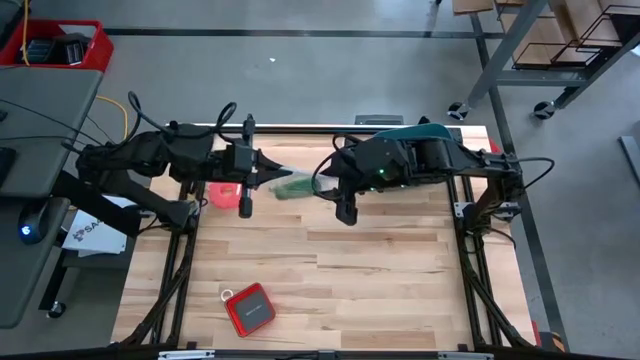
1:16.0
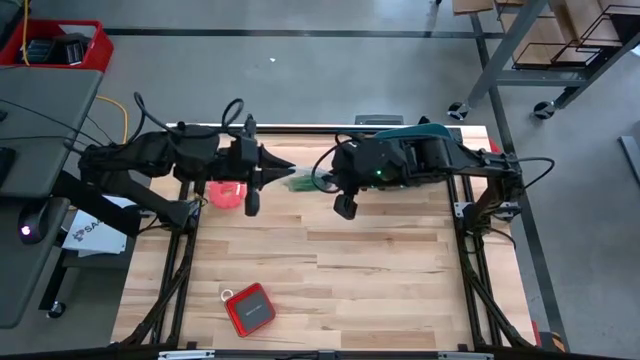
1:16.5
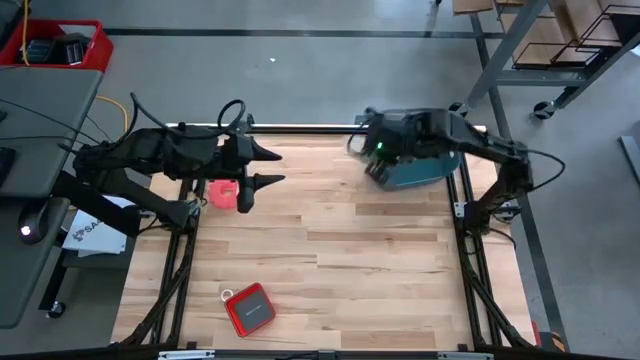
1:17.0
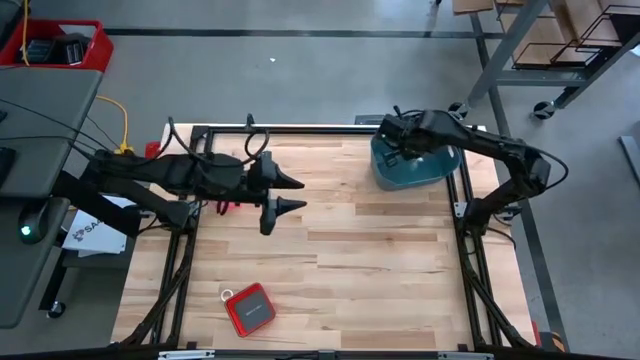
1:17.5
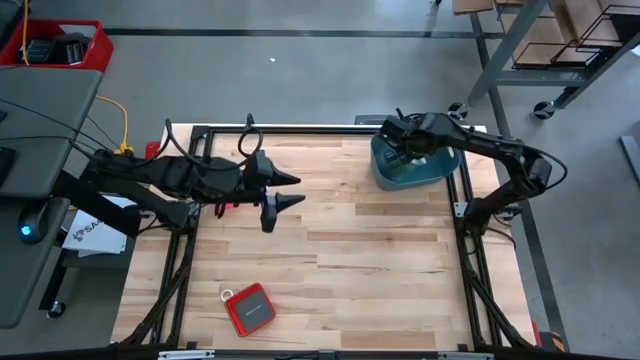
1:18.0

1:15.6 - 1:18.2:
Task: Roll bandage
Put the transparent zip bag into the blue bin

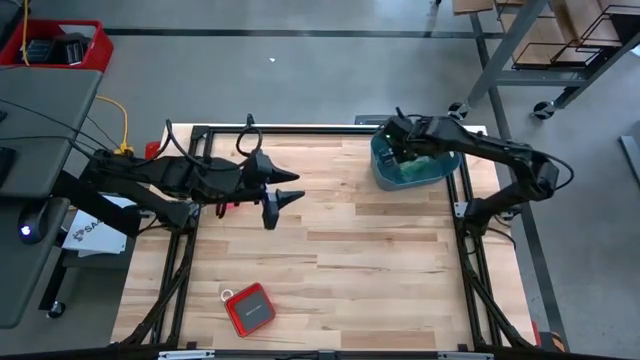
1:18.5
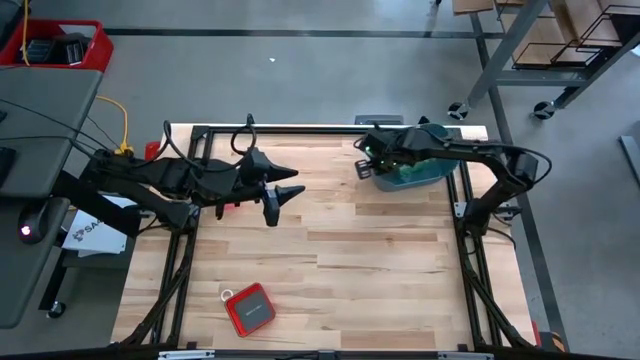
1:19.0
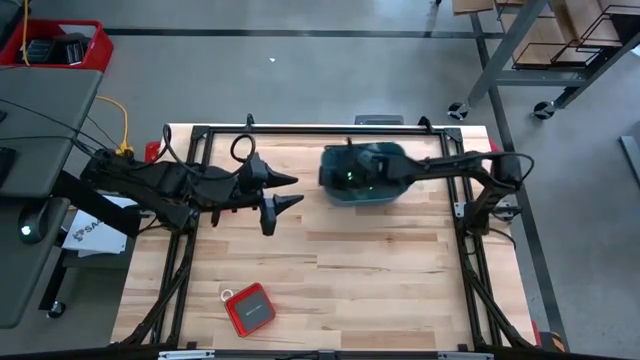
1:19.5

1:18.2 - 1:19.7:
Move the blue bin to the center of the table

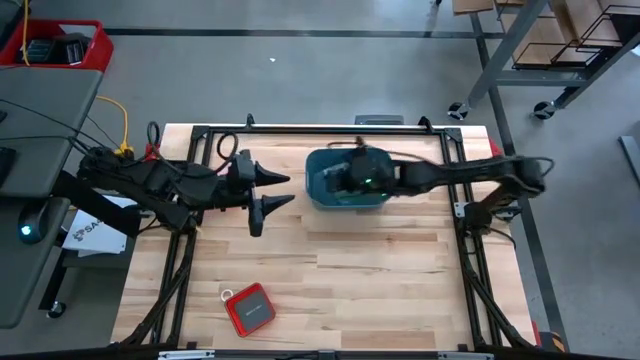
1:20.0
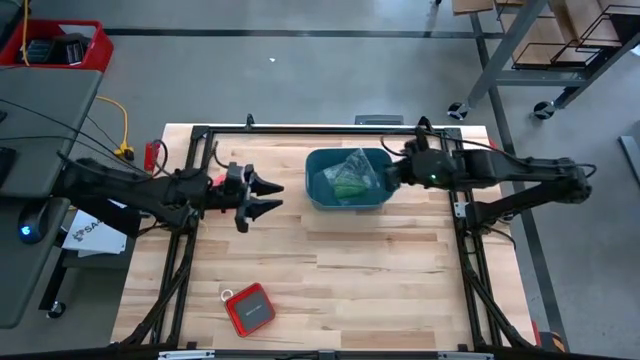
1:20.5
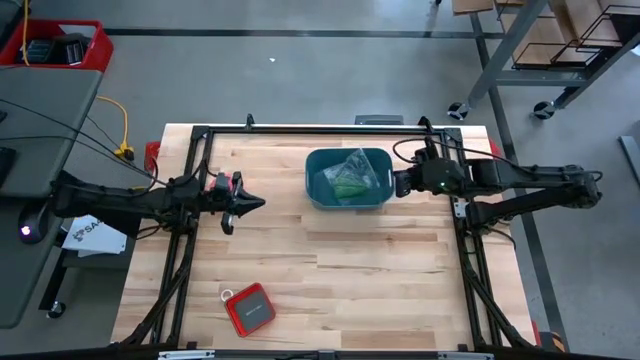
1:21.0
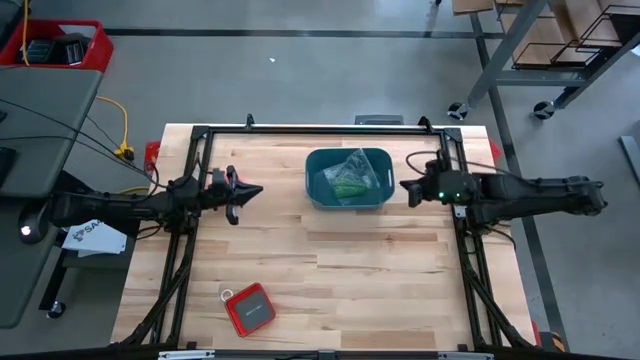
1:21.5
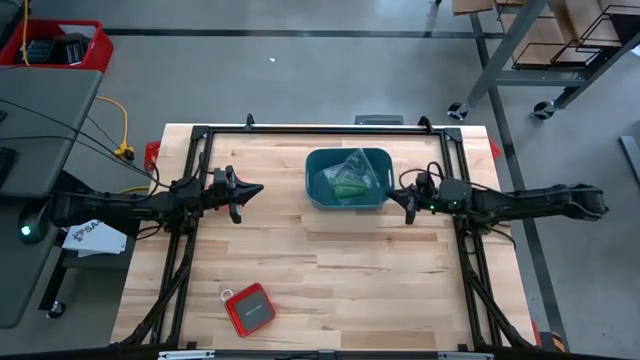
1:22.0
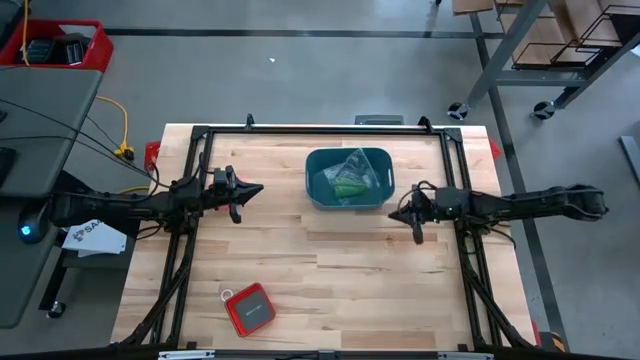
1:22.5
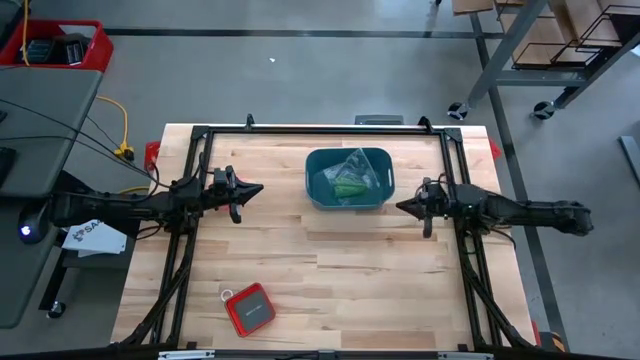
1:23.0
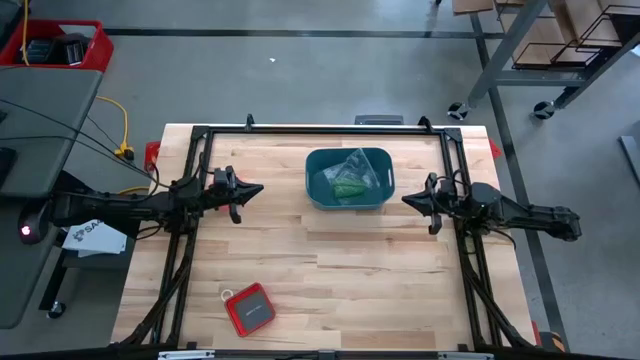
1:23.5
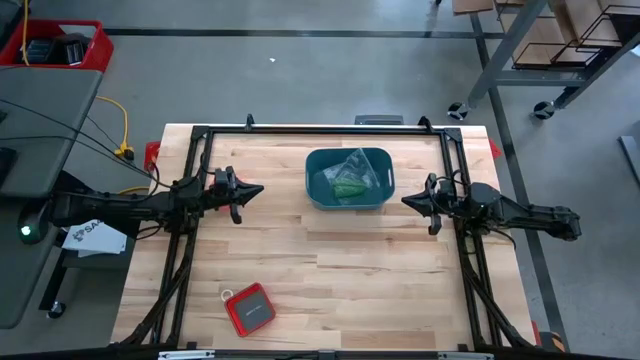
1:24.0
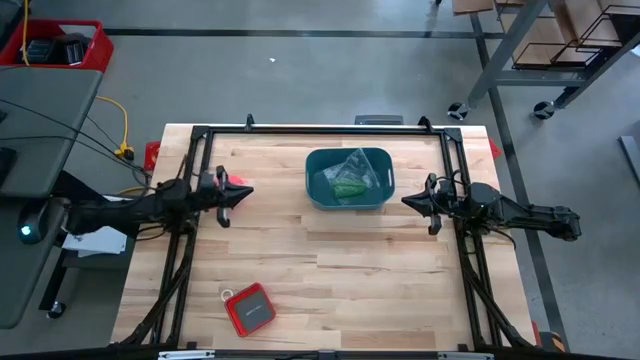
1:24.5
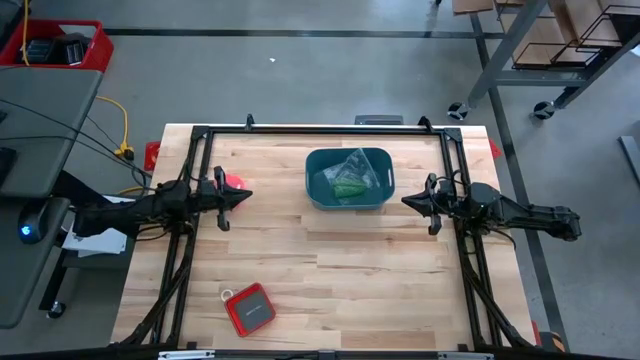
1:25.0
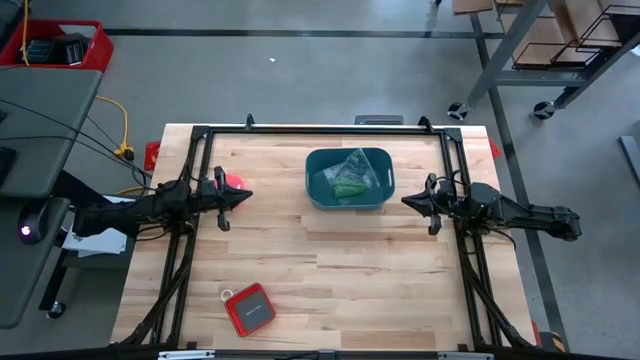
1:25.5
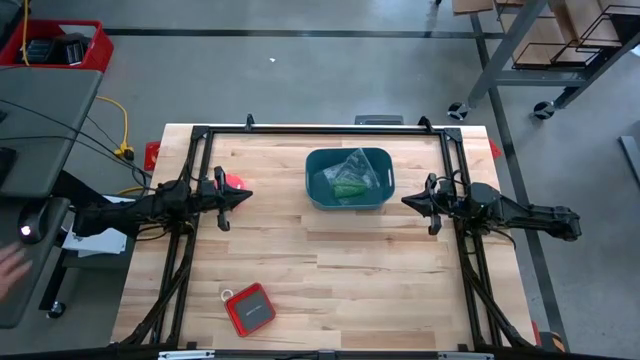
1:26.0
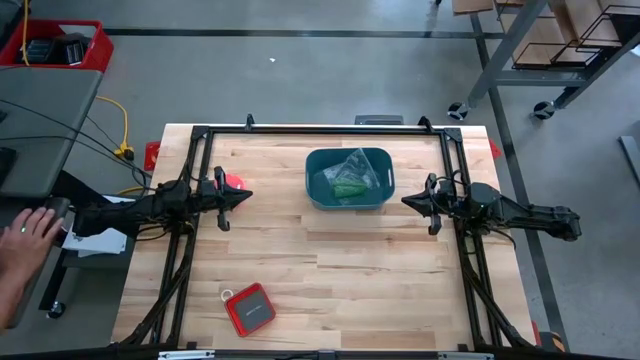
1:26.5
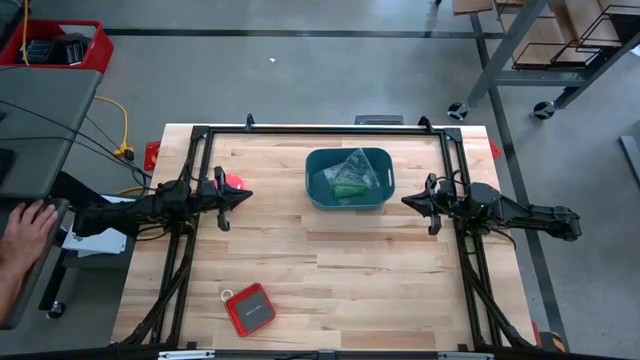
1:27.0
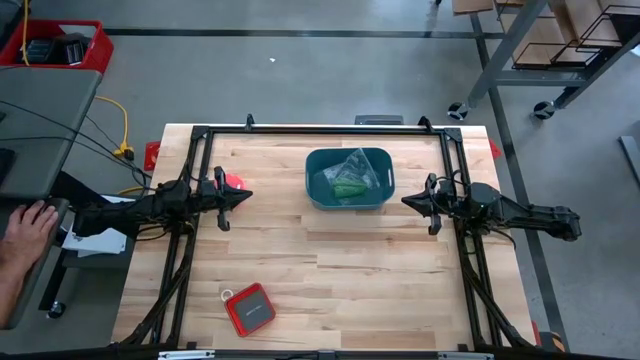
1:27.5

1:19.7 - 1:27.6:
Return to Home Position

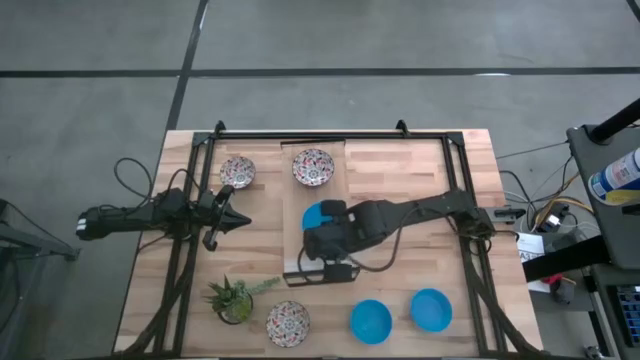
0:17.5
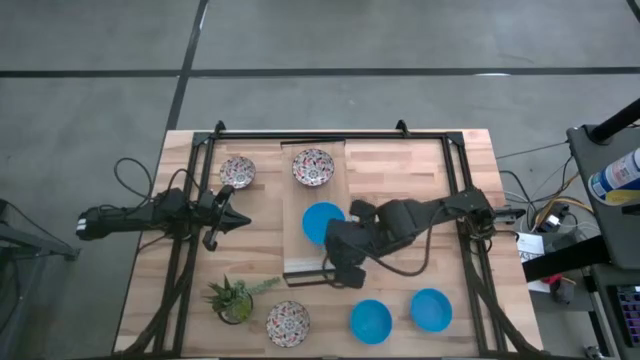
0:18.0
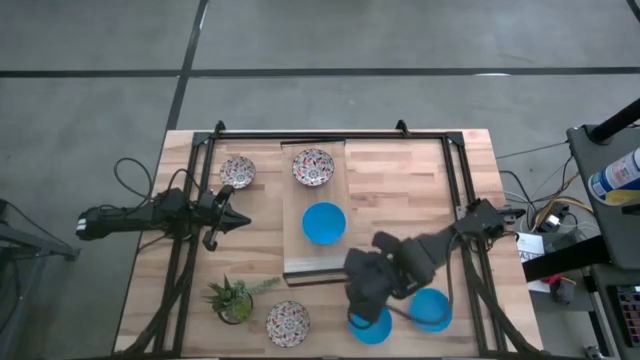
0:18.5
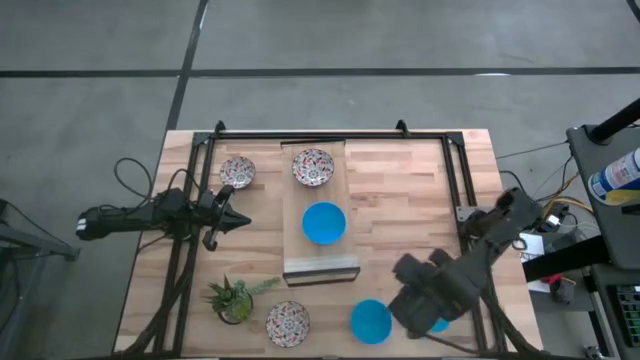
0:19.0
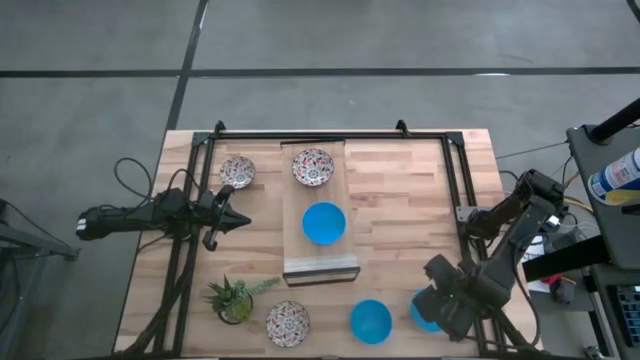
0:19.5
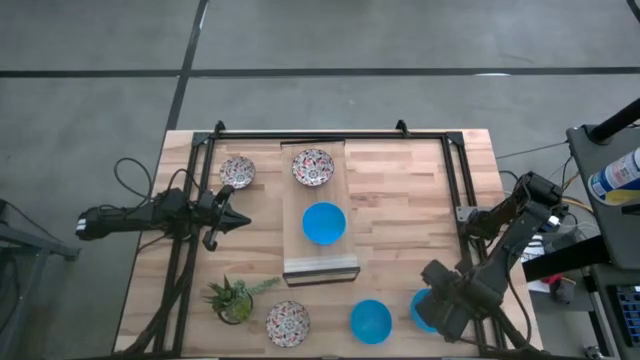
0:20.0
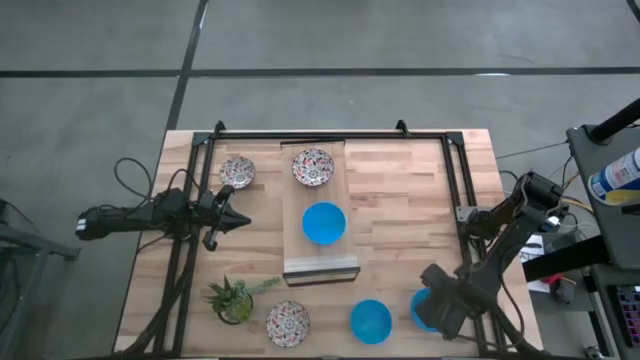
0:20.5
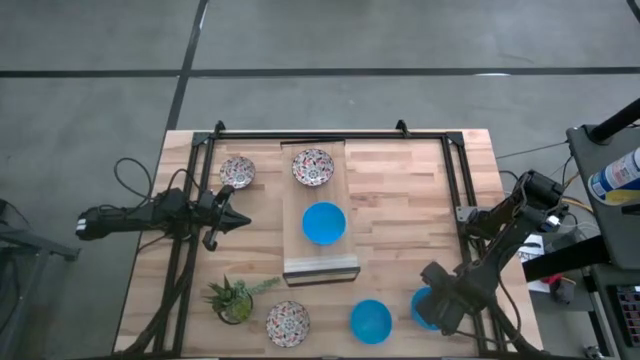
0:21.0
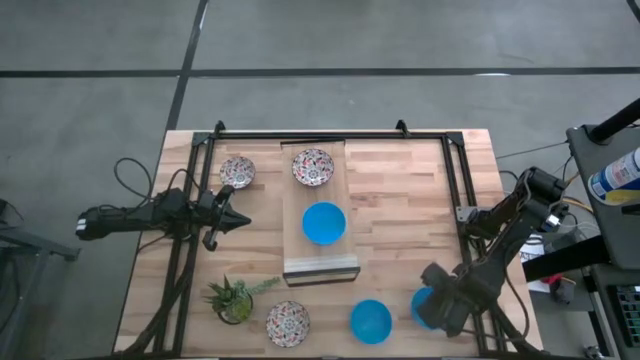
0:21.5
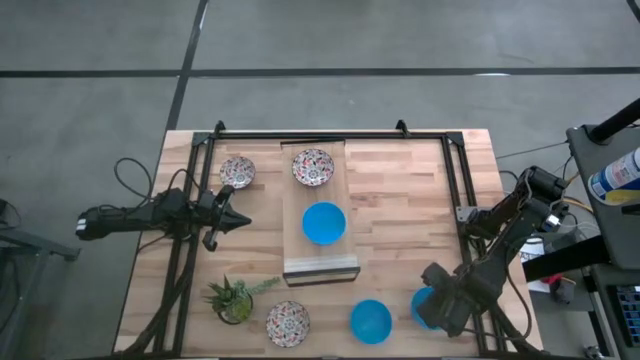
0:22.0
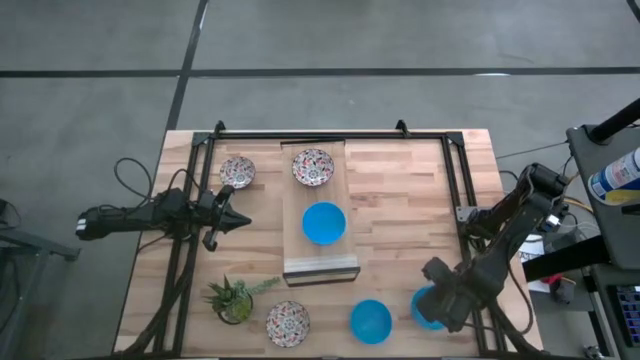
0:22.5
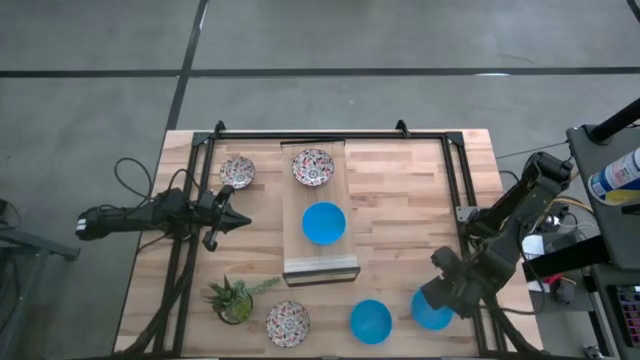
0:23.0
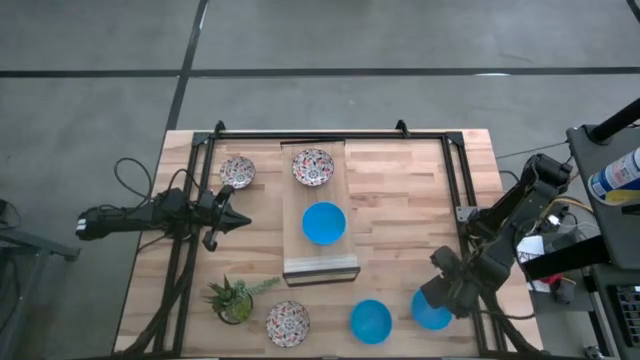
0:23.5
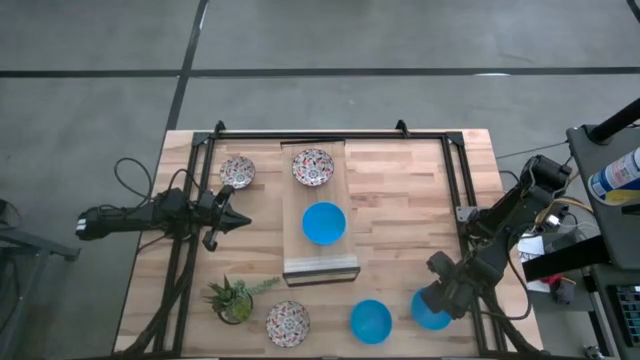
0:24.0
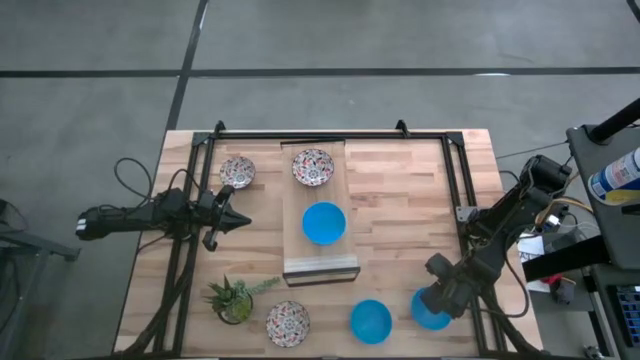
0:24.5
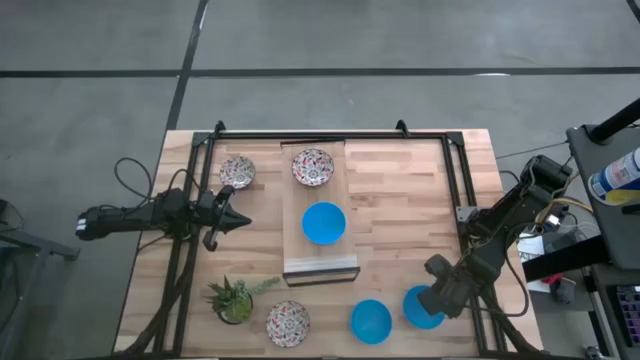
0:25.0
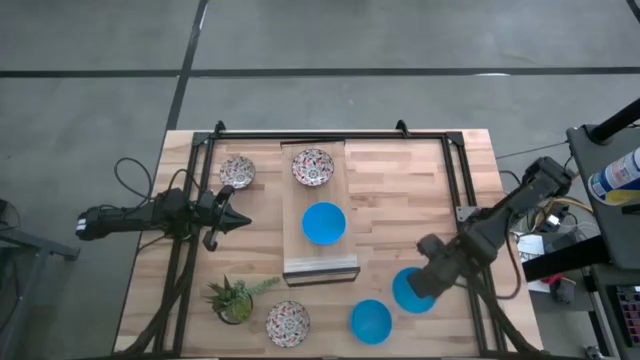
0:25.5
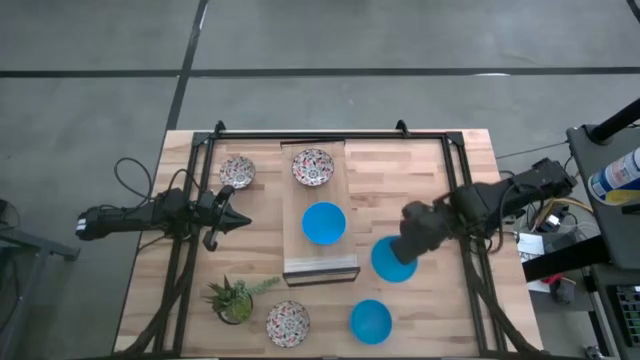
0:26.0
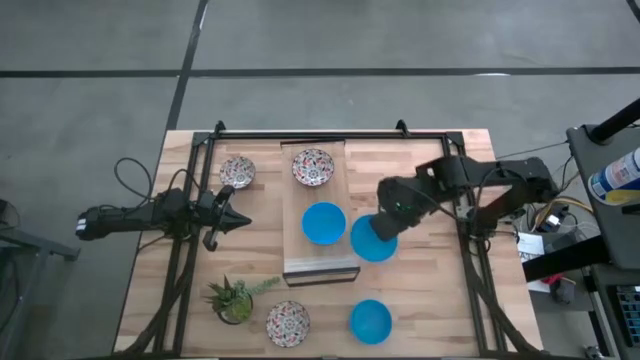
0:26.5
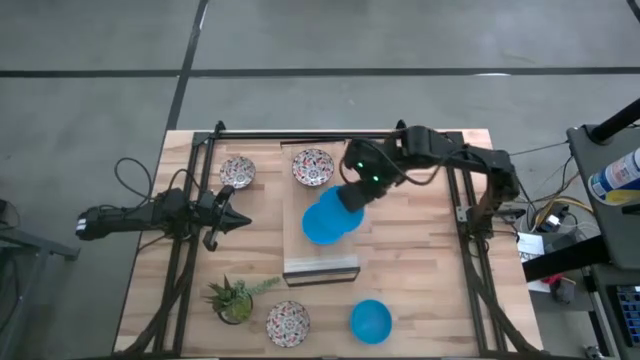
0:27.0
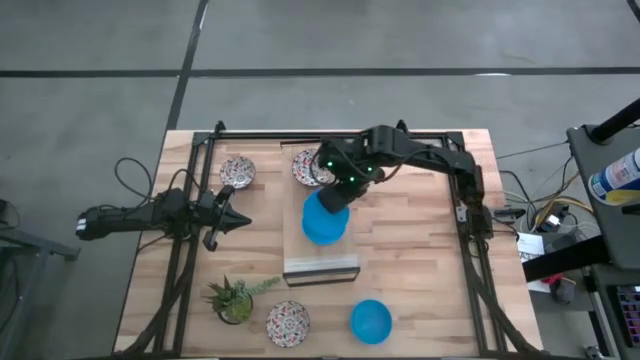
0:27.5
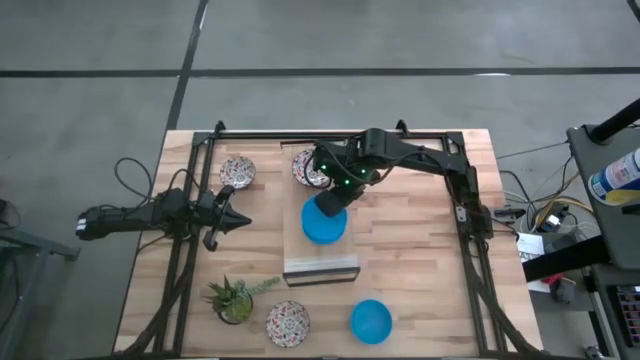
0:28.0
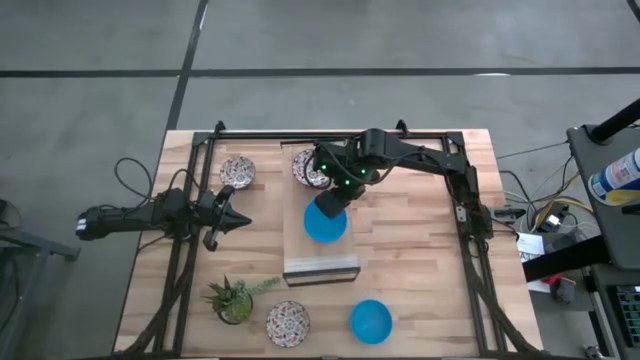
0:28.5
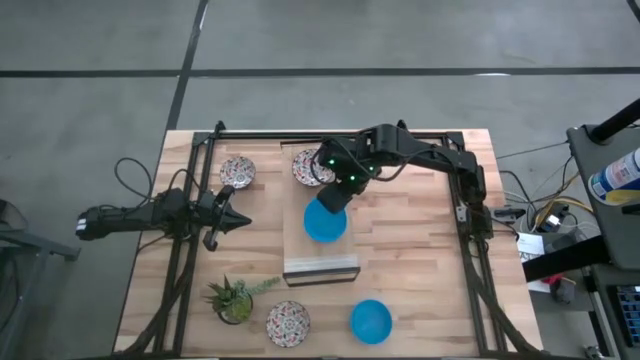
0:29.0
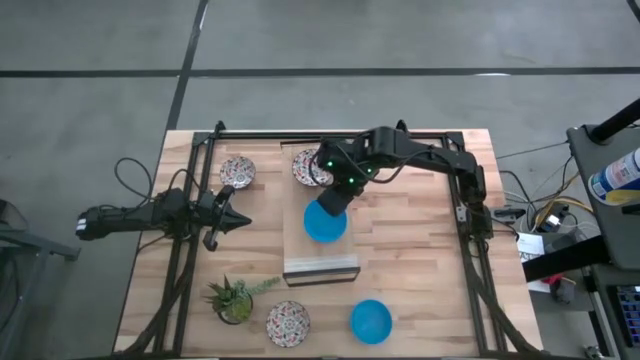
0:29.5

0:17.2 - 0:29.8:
Task: Pick & Place Mini bowls
Stack the right blue bowl on top of the blue bowl on the shelf
